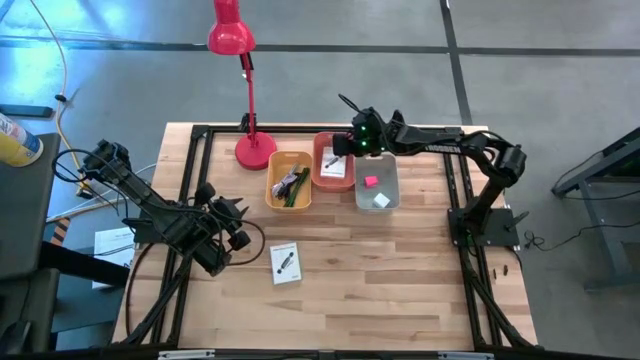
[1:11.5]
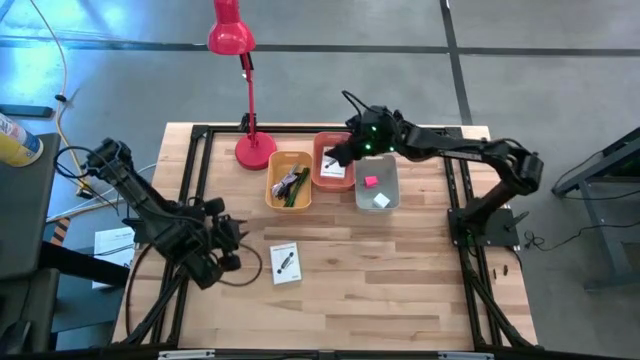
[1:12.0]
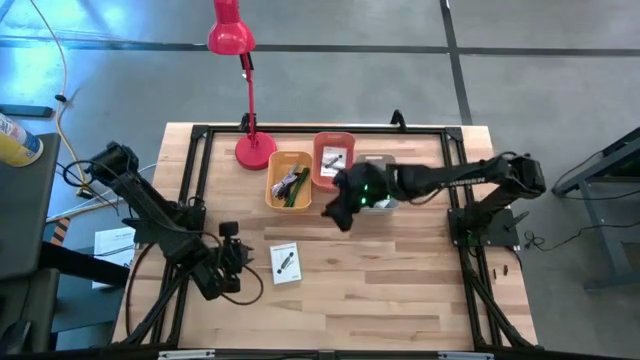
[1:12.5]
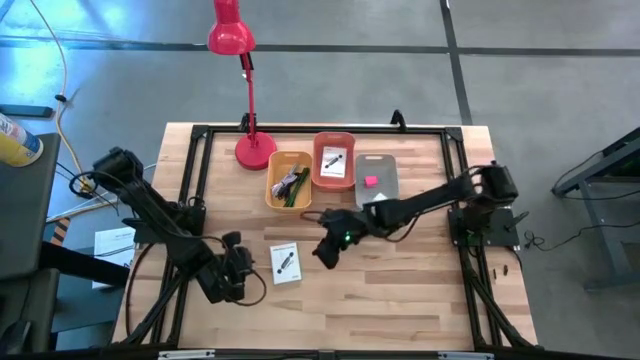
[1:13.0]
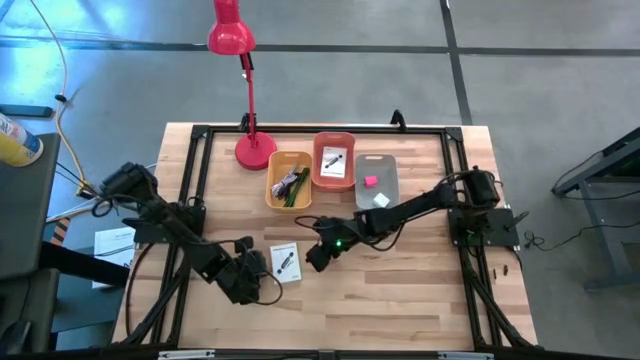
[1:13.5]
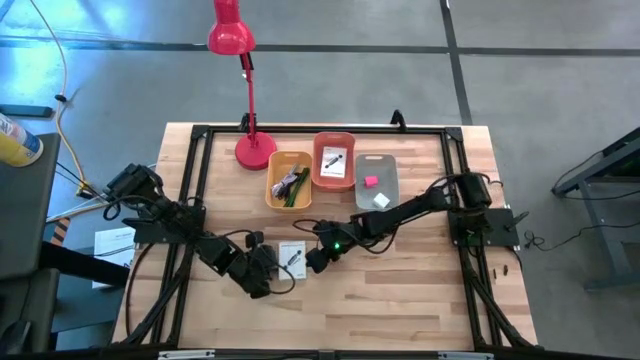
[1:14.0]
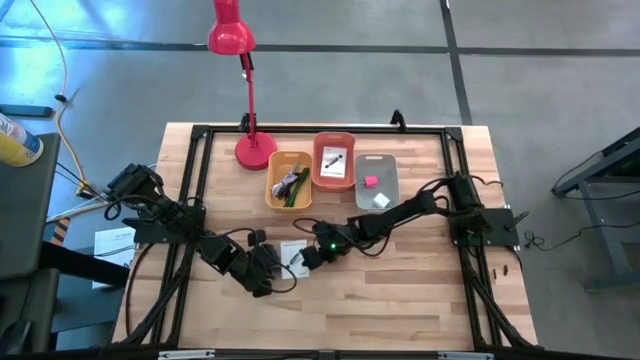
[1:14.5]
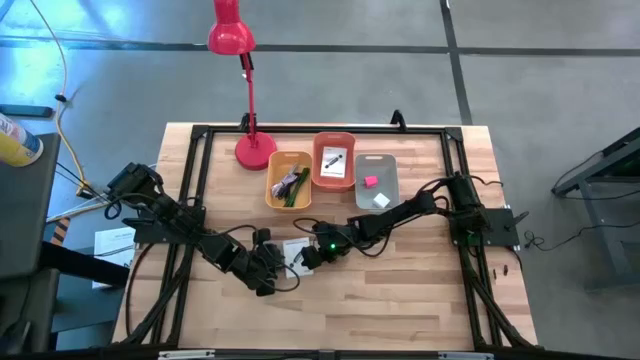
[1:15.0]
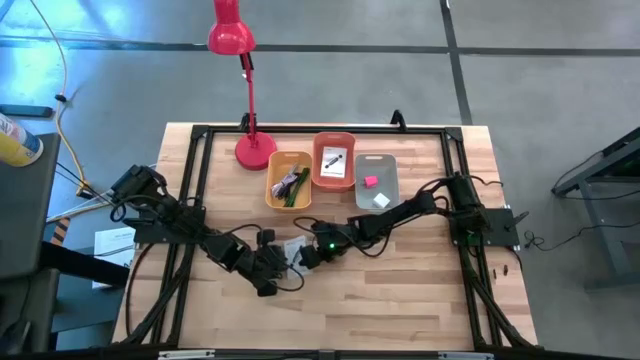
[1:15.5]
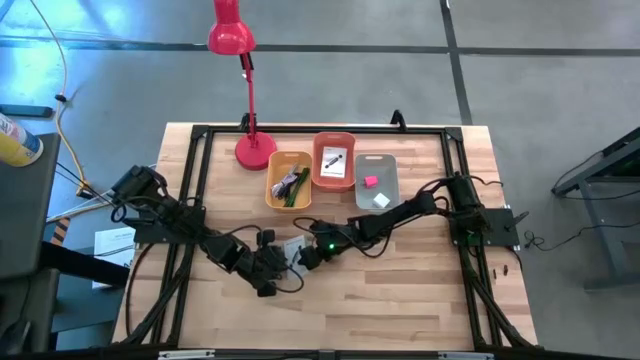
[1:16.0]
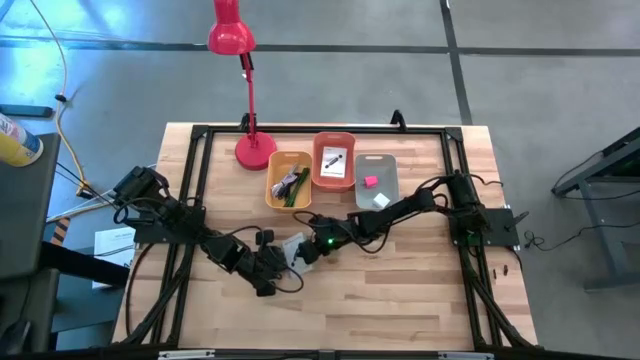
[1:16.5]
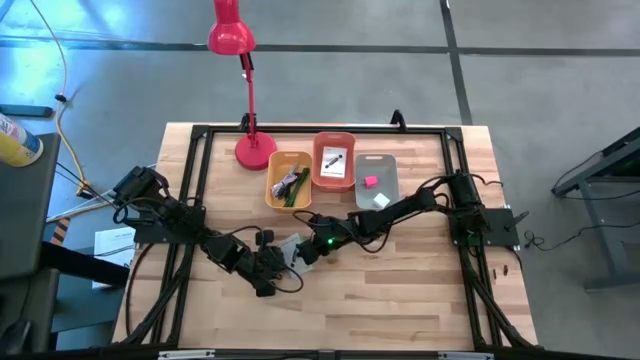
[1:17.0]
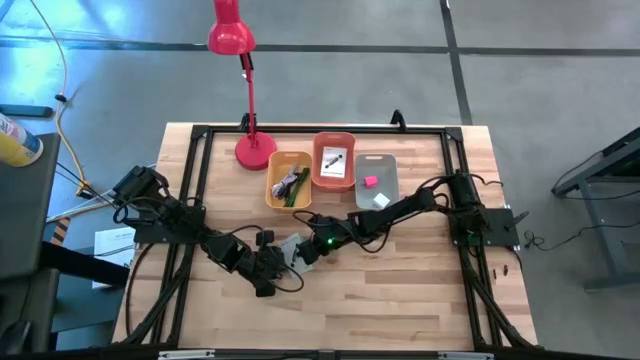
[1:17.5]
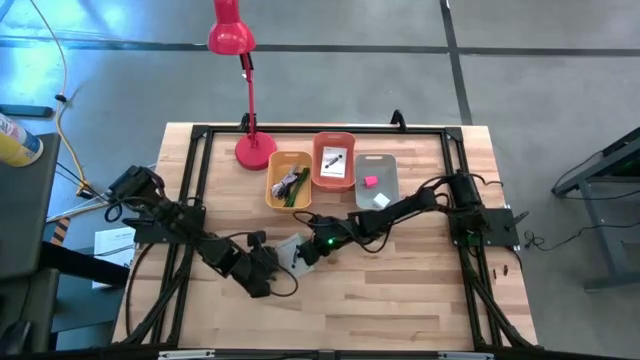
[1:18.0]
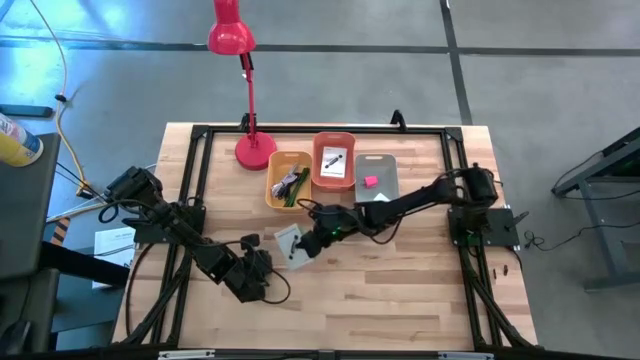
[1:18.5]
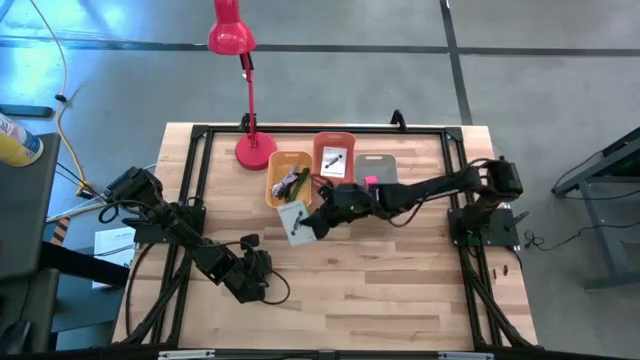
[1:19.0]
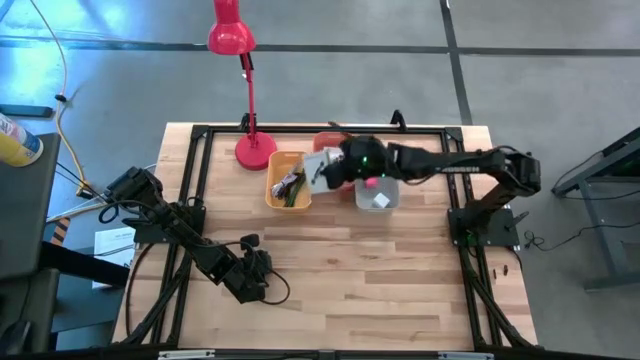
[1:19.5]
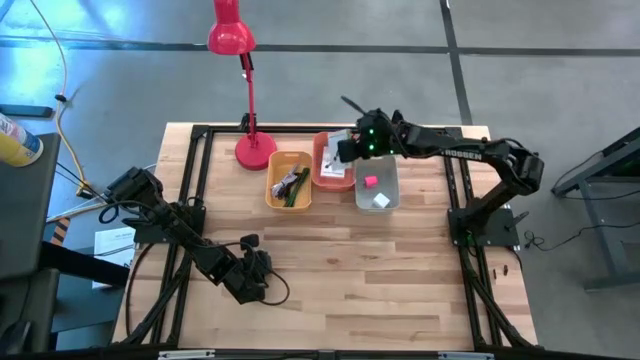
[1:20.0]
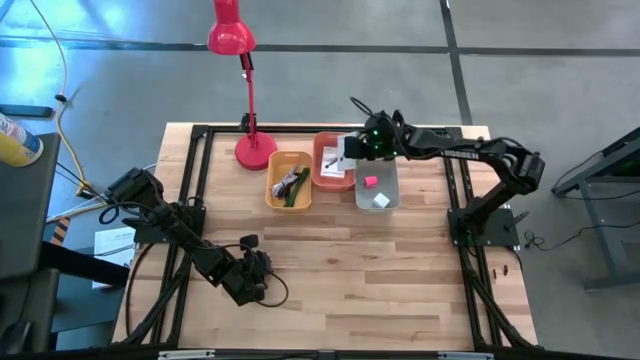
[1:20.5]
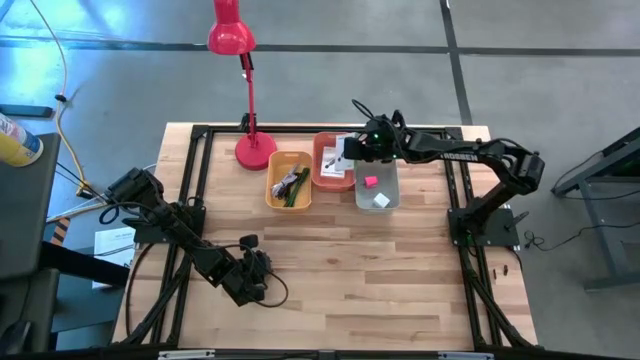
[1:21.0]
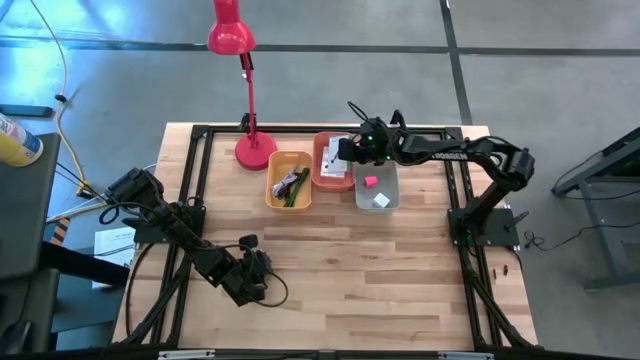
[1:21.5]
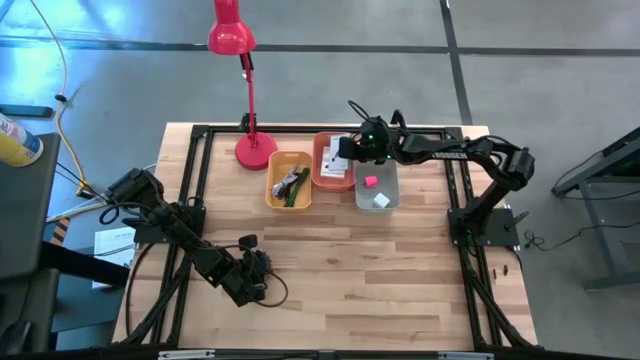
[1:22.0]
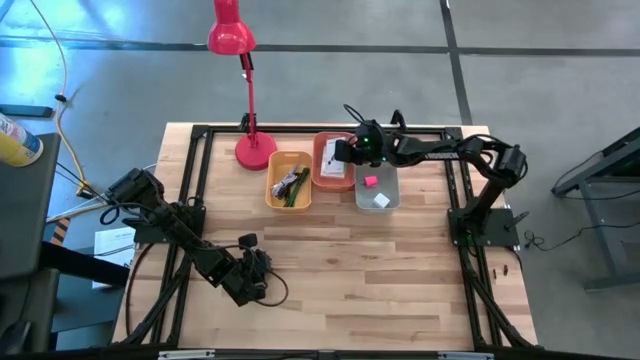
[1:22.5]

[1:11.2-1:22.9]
Task: Pick and place items into bin
Put the white card reader box into the orange bin

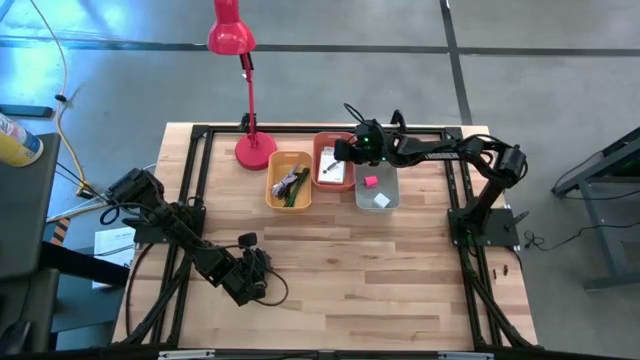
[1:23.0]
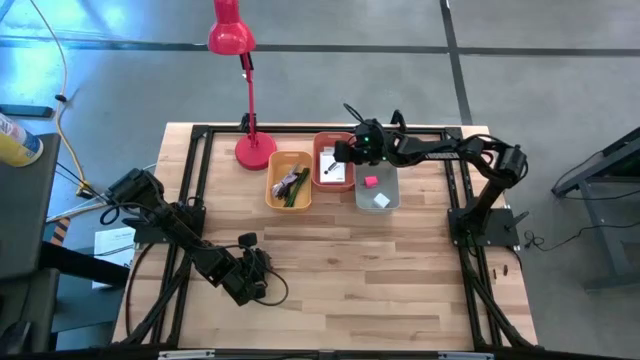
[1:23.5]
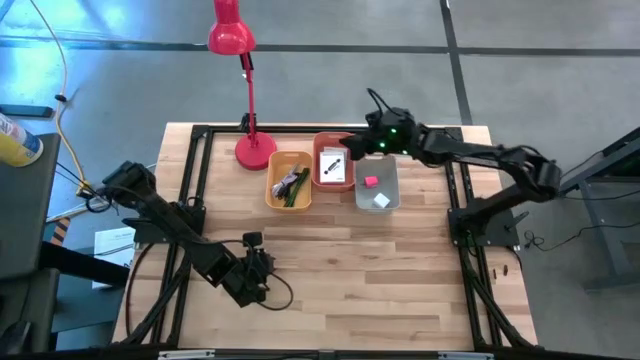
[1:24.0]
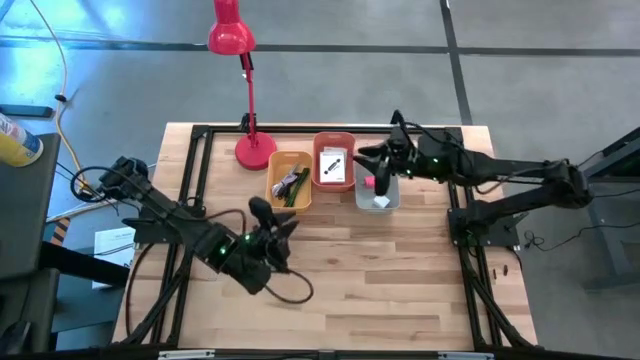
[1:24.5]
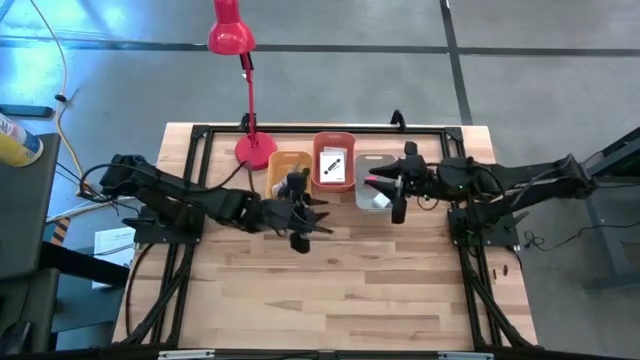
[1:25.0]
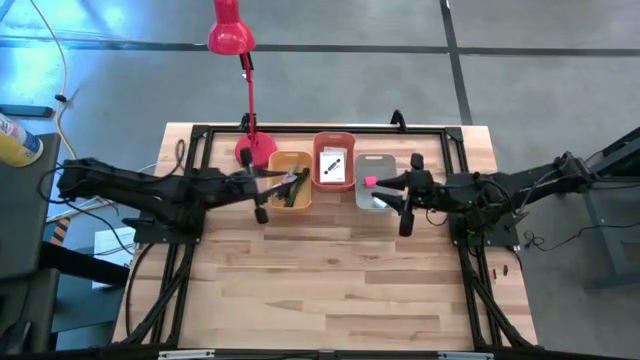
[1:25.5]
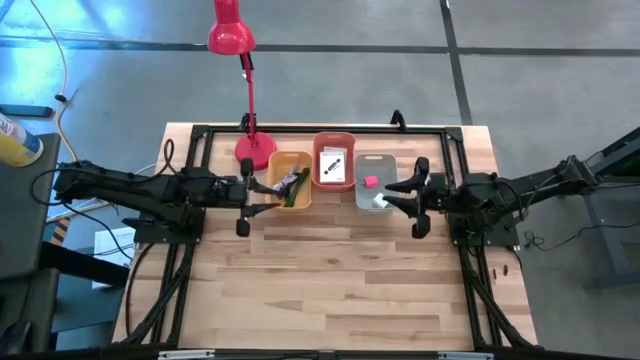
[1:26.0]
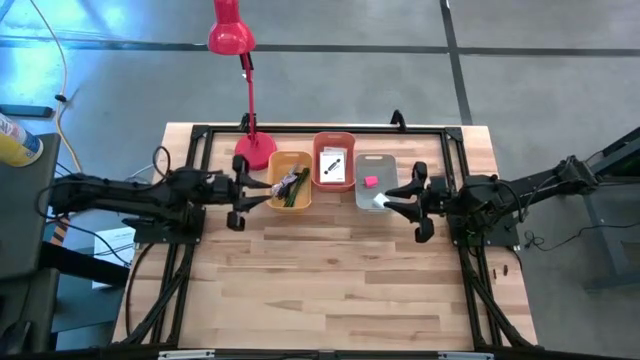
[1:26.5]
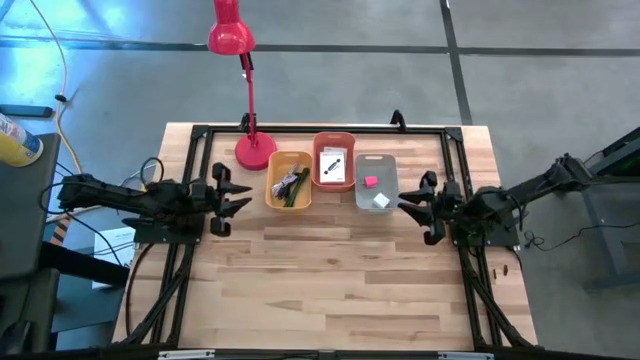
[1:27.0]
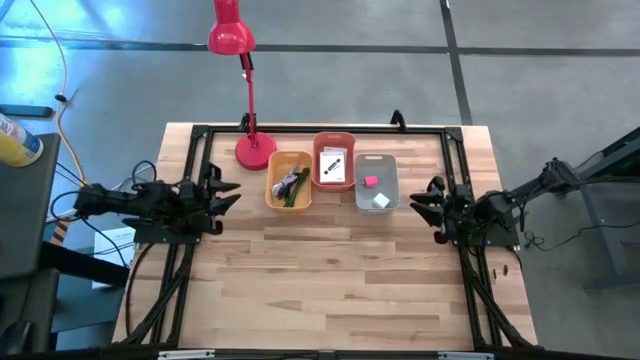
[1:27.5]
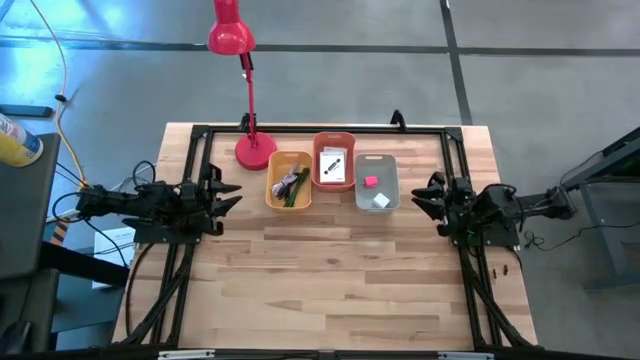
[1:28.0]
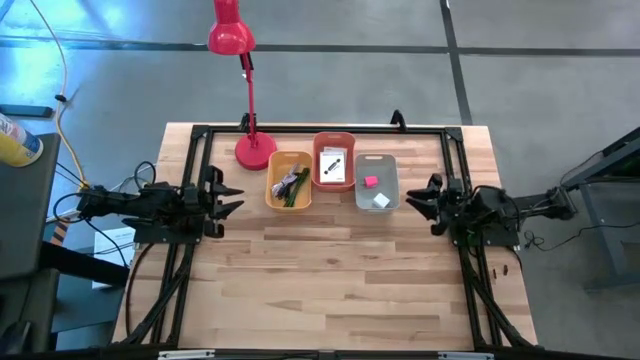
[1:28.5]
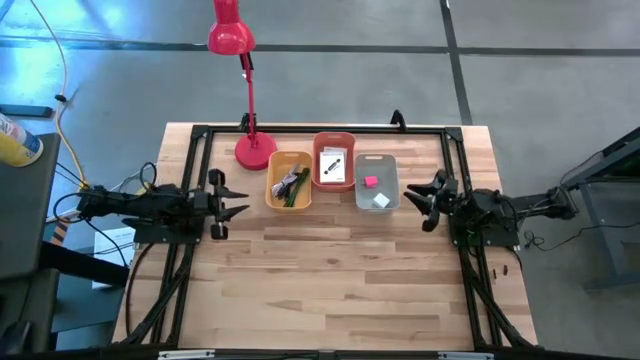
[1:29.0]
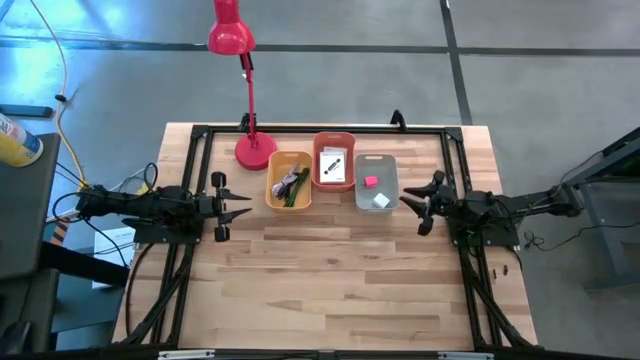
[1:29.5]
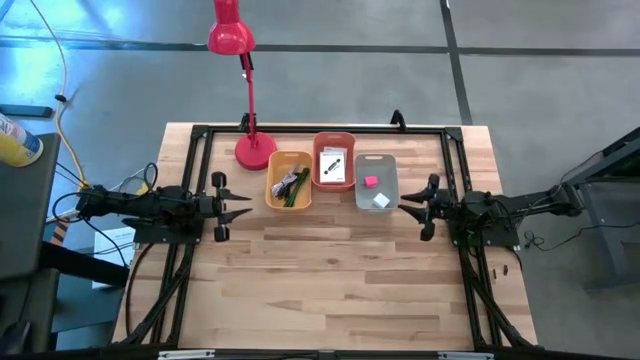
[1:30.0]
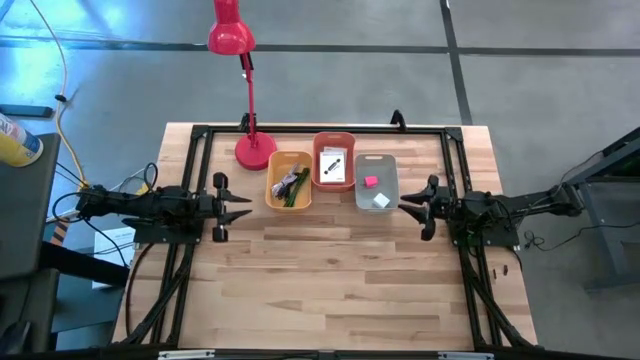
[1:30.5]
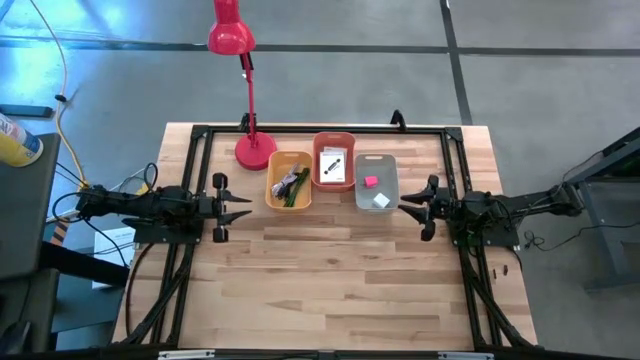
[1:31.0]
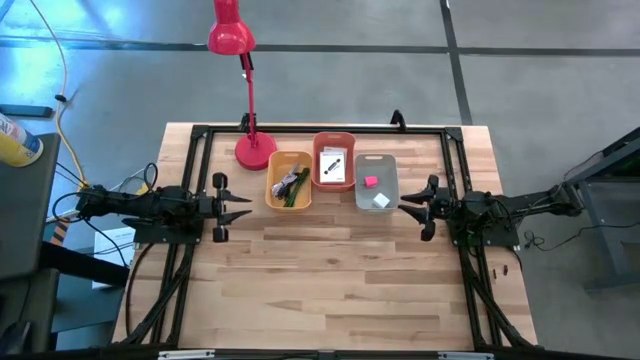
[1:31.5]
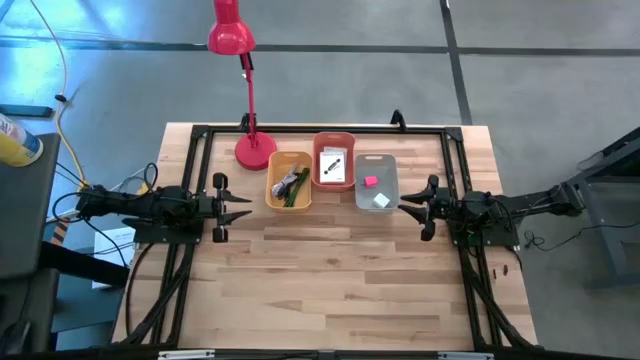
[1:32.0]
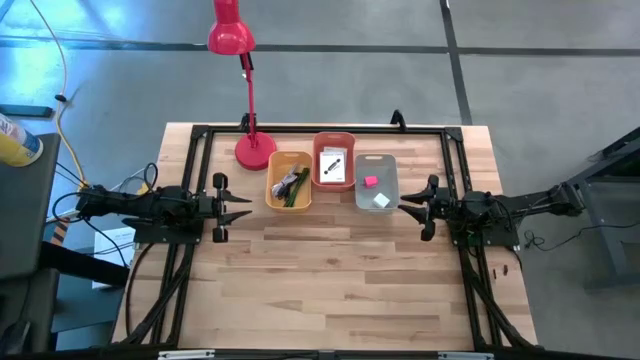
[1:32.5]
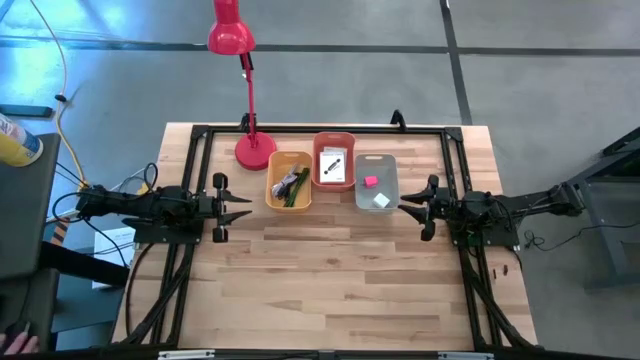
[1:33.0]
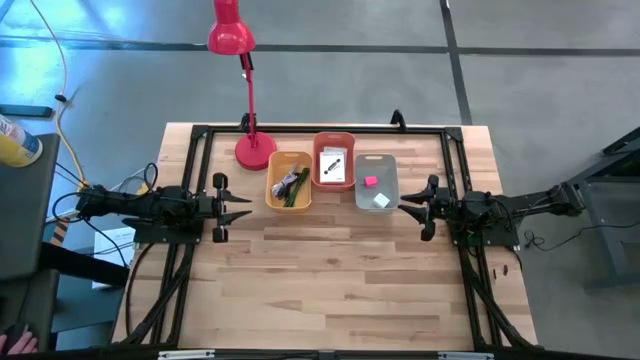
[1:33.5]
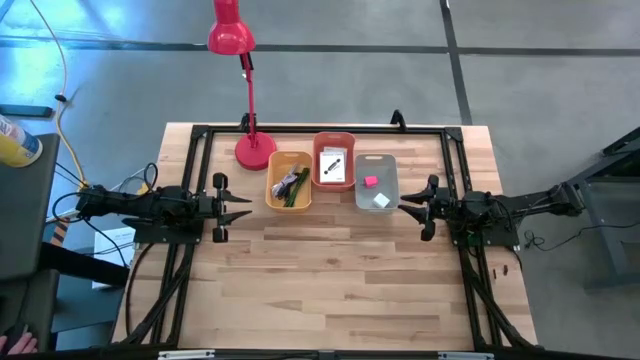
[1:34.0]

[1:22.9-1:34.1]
Return to Home Position
